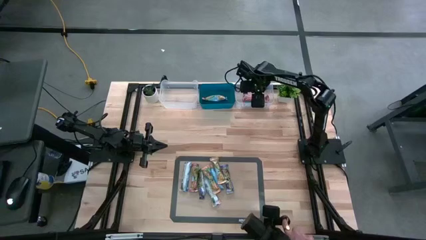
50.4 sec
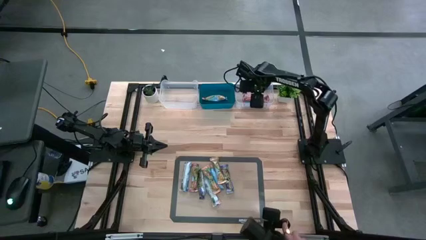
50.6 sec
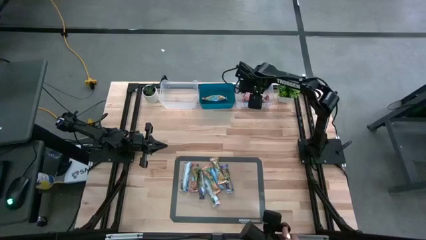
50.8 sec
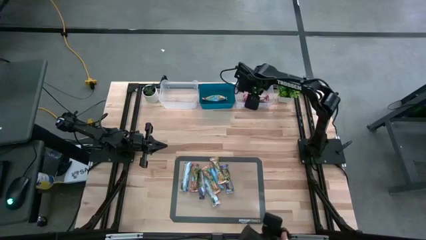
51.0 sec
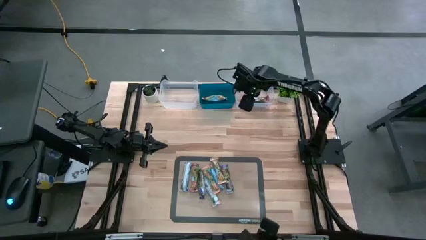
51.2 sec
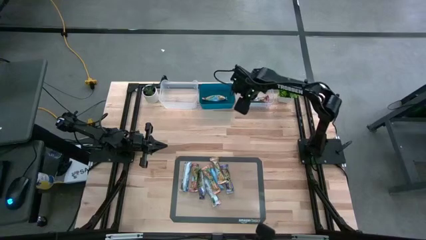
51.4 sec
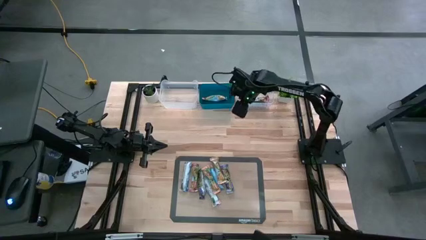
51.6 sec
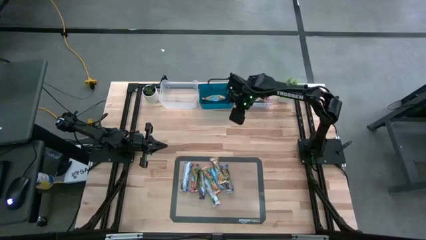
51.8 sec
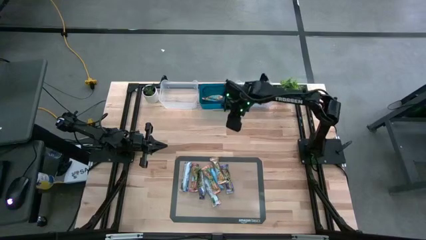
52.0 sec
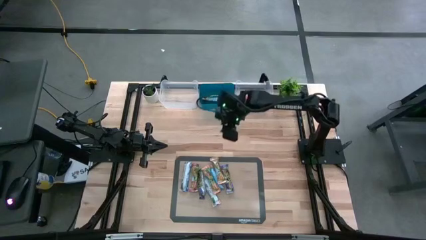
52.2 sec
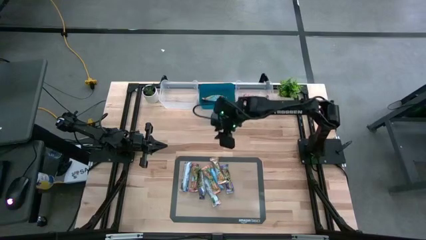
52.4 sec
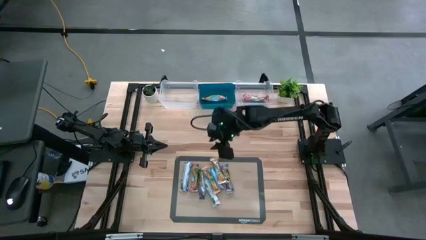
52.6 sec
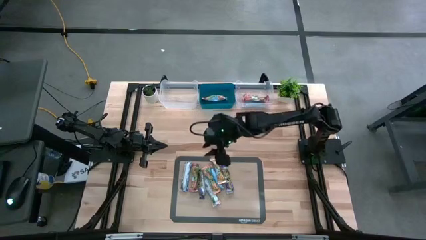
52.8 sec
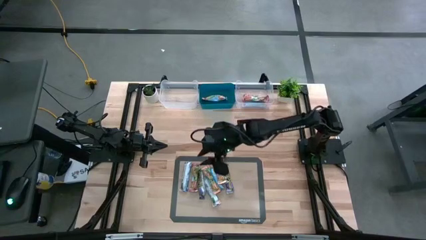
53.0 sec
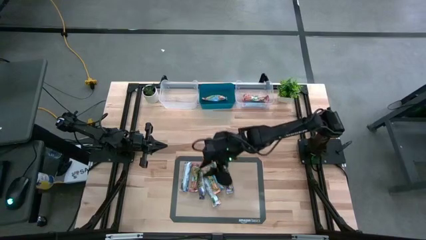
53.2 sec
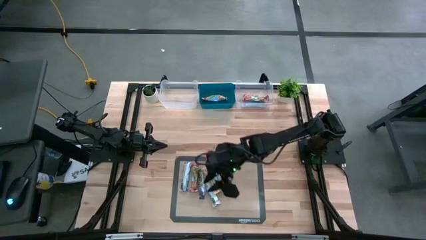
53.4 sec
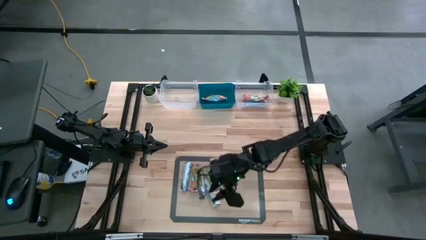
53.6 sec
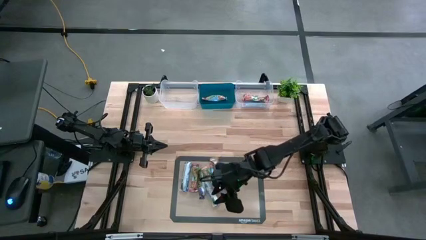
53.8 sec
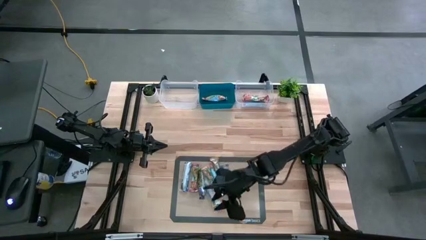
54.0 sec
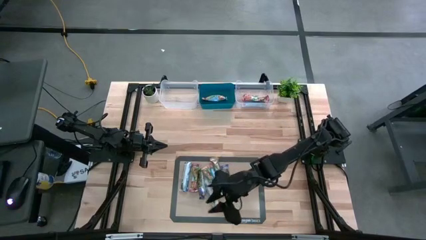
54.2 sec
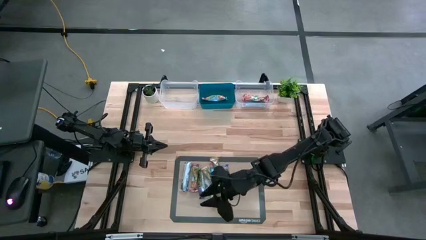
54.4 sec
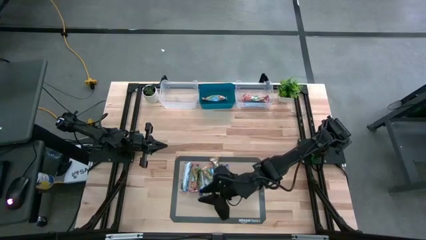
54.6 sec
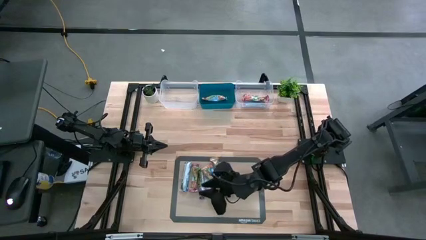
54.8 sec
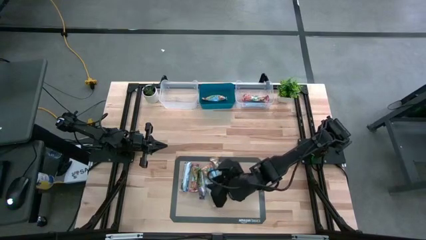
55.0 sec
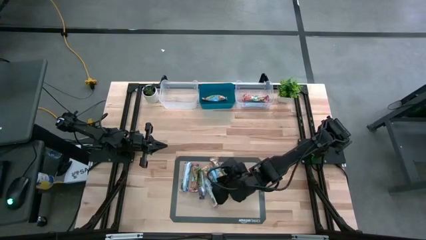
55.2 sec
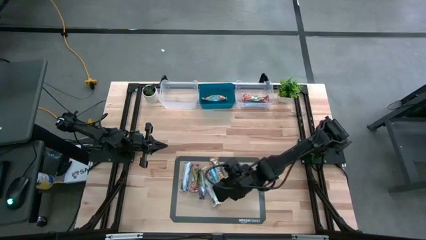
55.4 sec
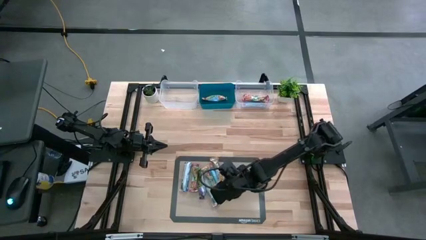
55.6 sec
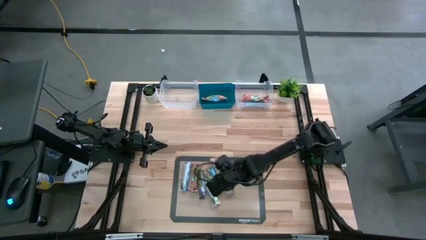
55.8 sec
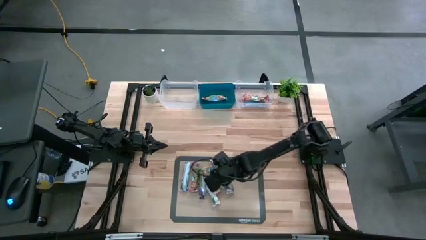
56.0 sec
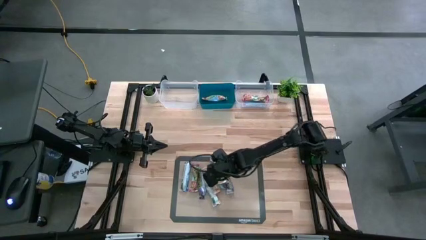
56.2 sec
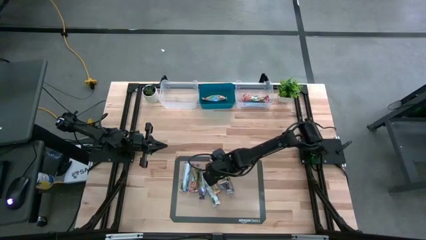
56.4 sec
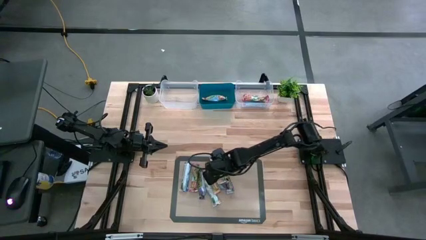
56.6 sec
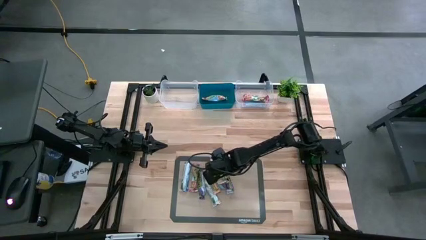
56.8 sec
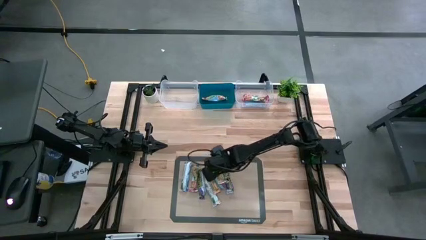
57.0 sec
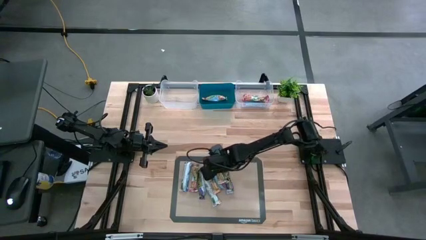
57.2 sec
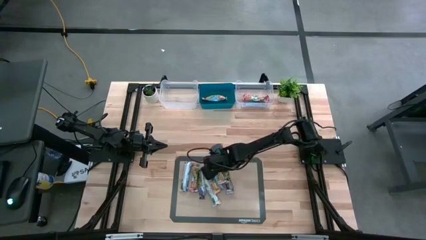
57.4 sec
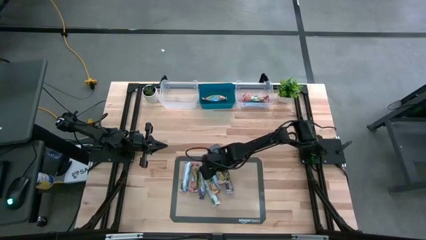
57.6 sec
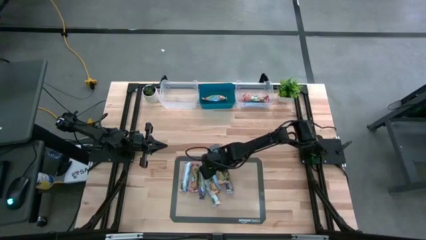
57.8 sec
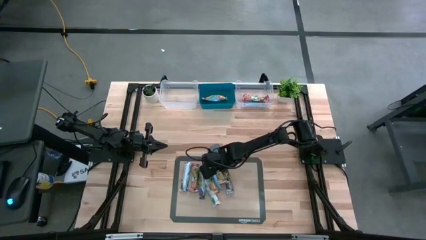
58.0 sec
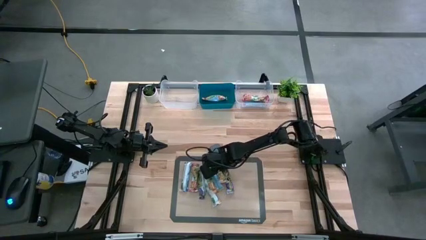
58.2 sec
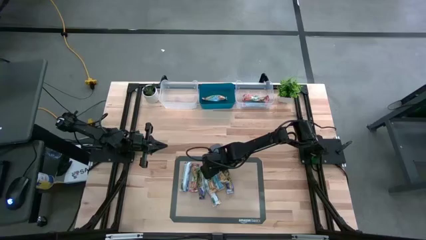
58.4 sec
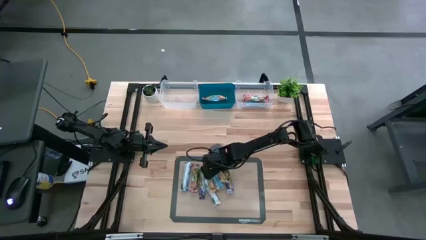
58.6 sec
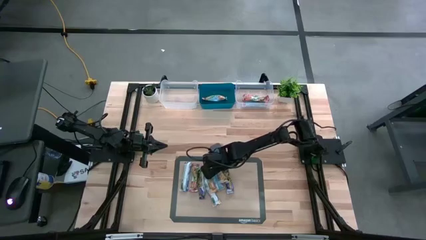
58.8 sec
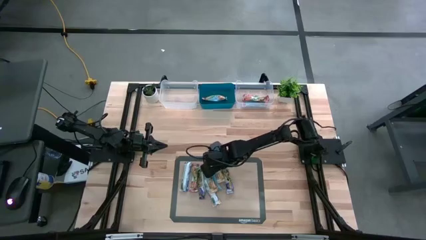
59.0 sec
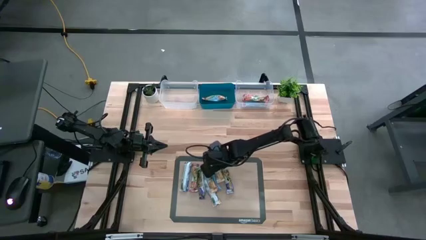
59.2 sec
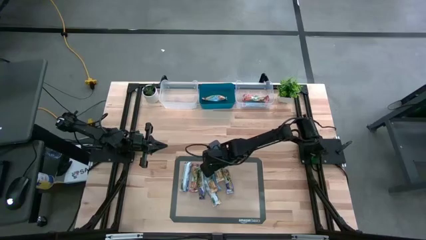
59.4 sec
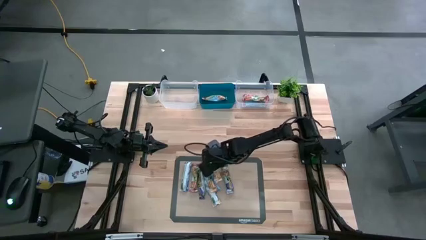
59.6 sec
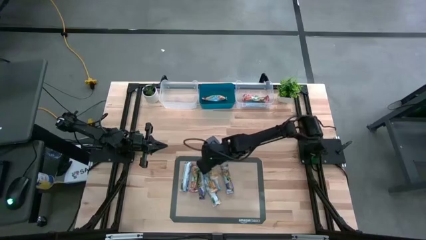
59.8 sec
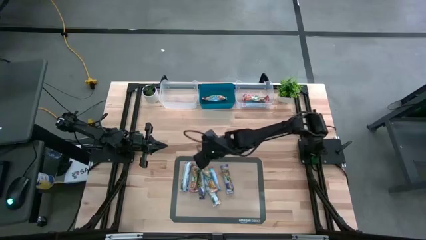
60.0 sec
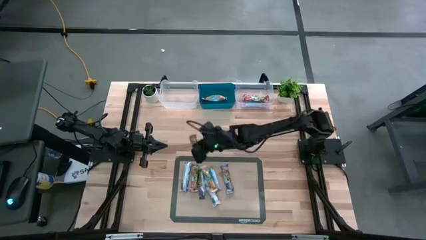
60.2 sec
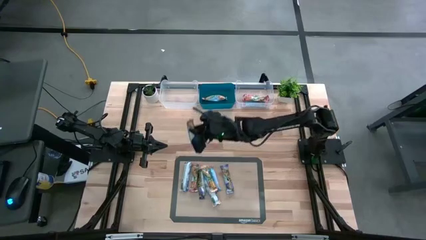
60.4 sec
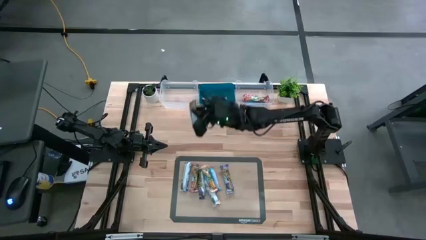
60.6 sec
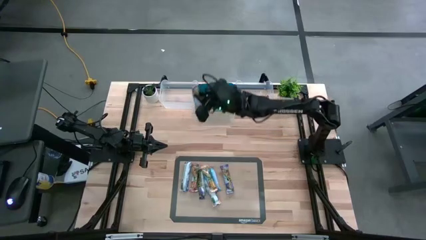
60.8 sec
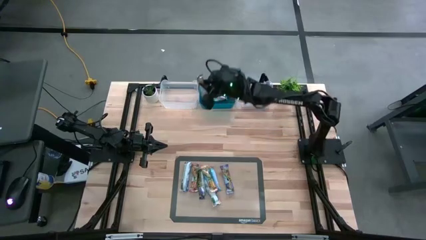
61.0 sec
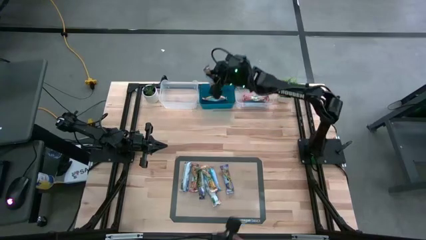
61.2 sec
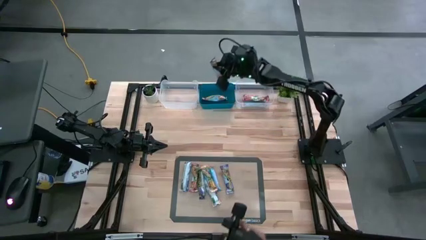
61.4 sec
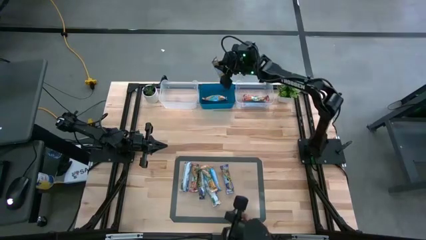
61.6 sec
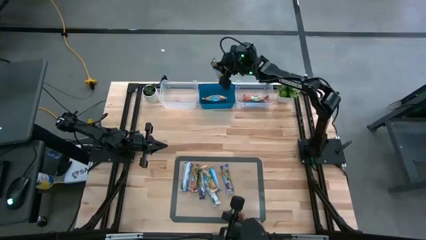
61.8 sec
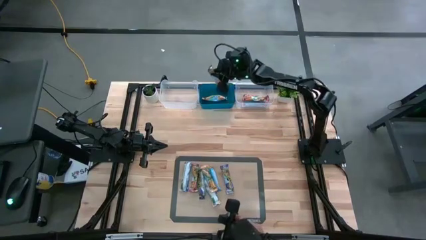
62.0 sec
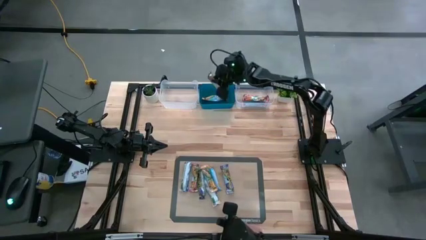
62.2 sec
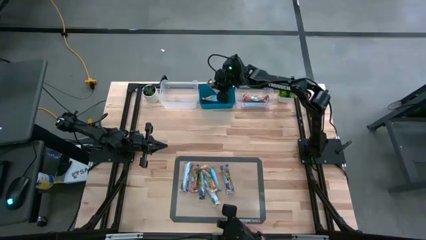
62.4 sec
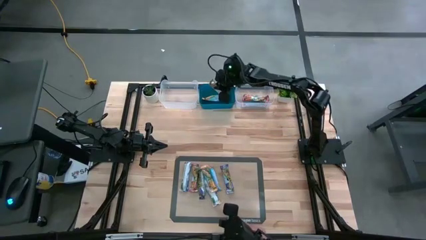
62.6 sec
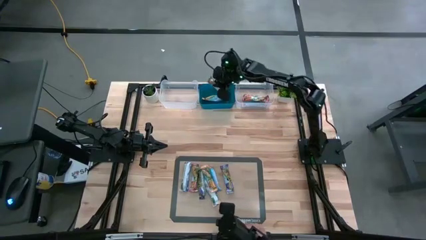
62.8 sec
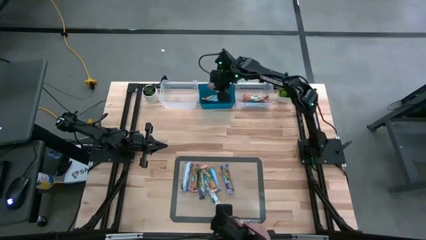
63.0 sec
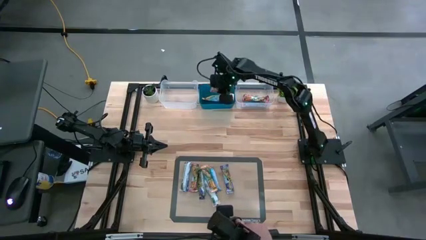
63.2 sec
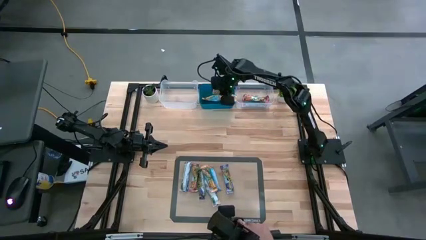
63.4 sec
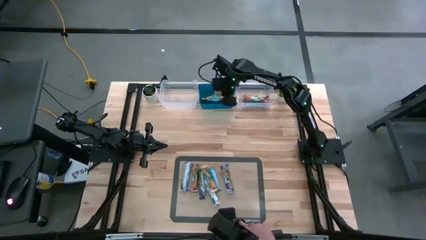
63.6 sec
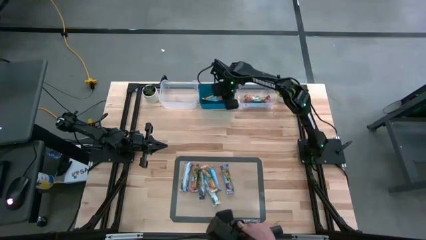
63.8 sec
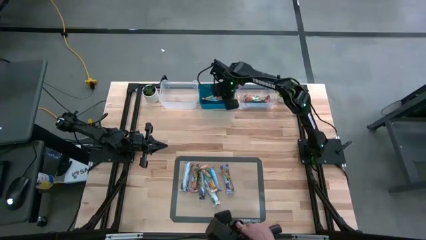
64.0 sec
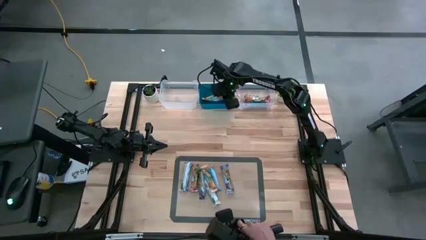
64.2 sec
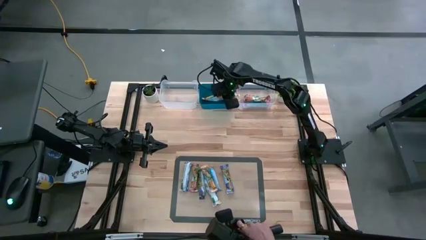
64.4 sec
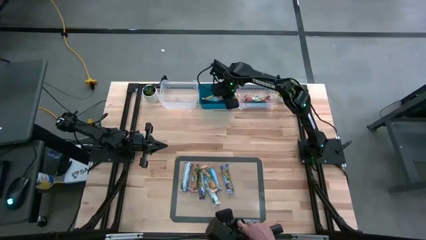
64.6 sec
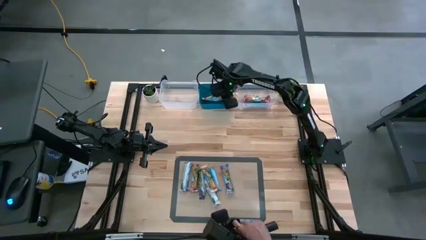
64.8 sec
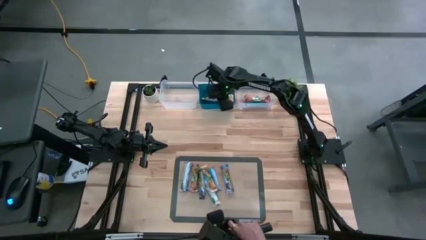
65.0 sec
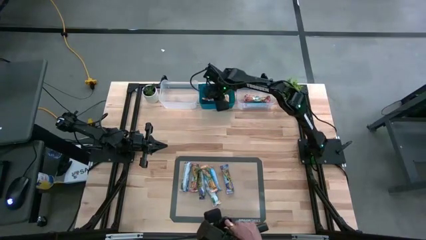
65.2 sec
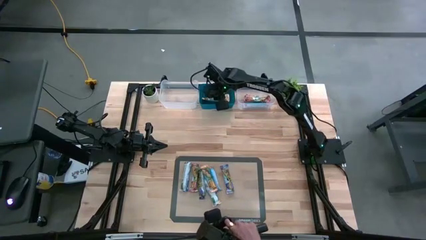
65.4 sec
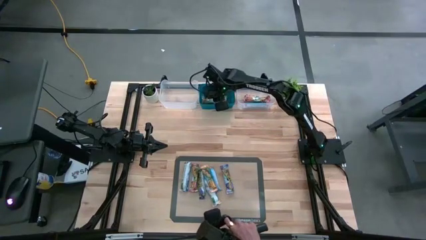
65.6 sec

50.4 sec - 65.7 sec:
Task: Pick and place Granola Bars by type
Put the yellow granola bar into the blue bin
